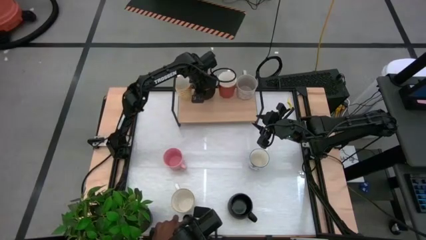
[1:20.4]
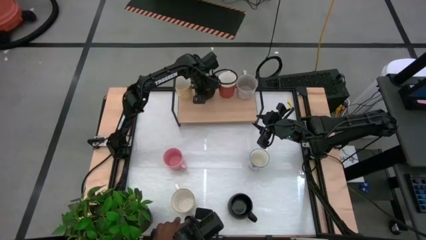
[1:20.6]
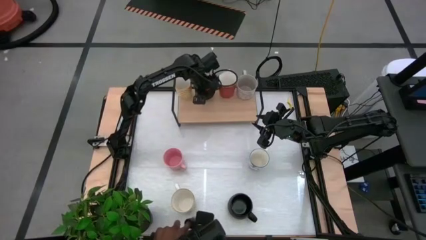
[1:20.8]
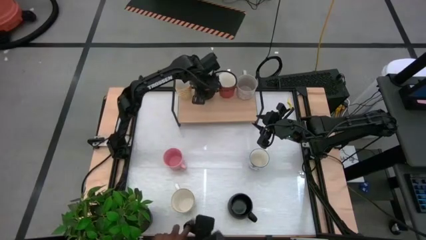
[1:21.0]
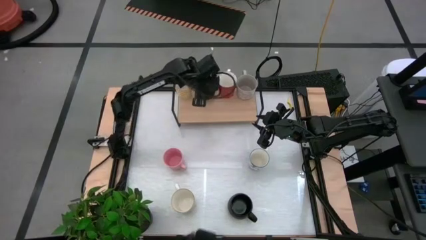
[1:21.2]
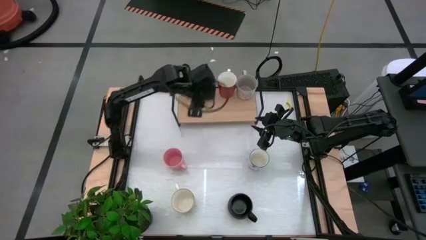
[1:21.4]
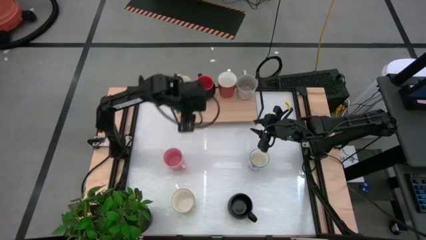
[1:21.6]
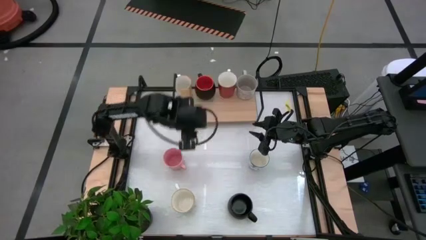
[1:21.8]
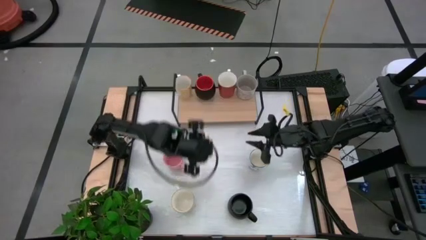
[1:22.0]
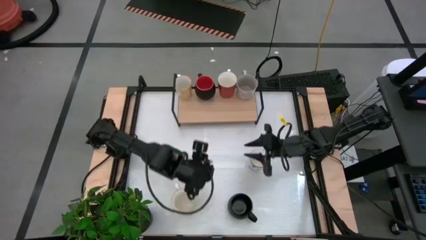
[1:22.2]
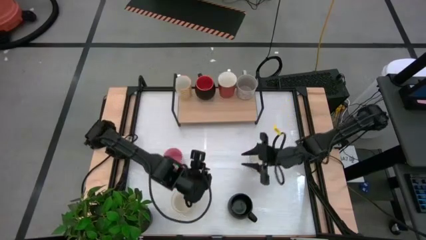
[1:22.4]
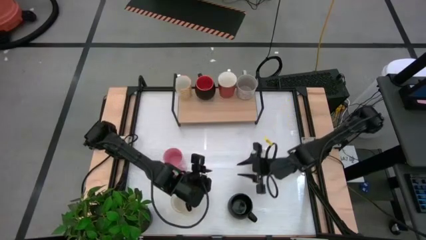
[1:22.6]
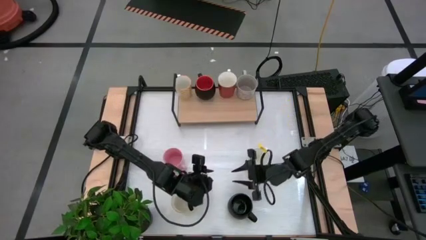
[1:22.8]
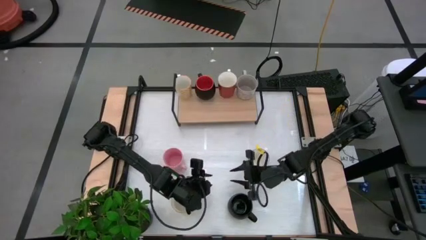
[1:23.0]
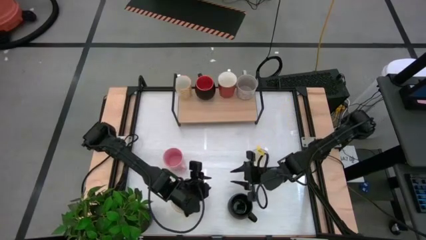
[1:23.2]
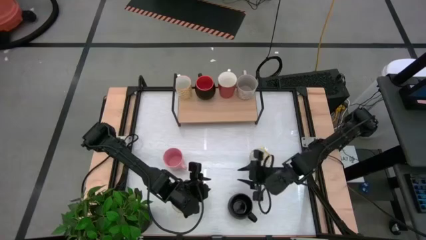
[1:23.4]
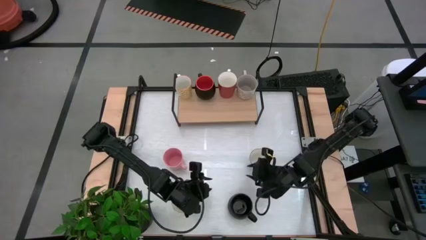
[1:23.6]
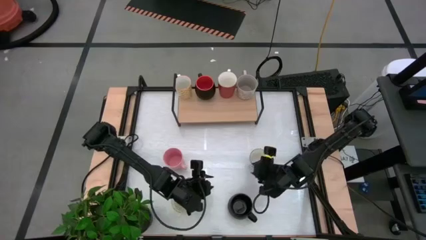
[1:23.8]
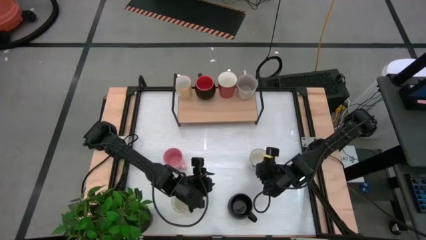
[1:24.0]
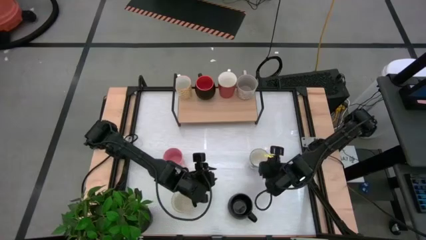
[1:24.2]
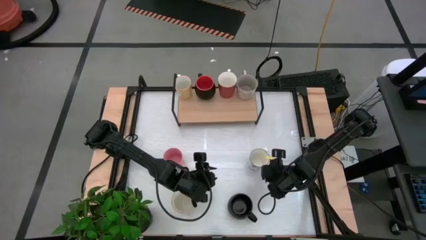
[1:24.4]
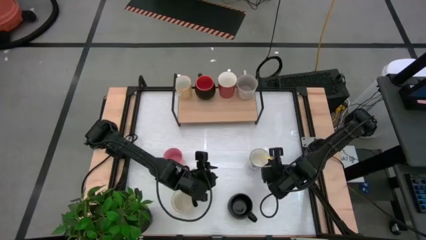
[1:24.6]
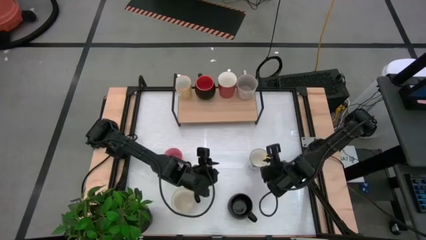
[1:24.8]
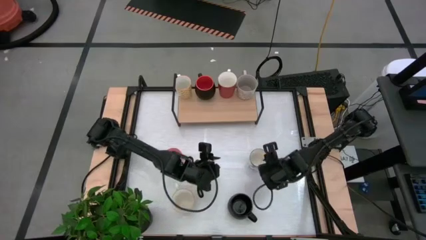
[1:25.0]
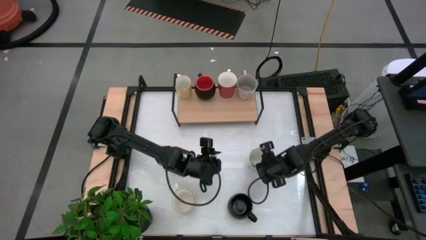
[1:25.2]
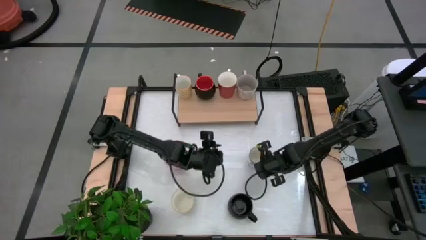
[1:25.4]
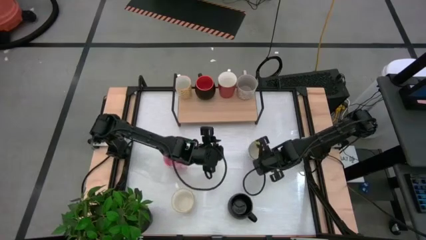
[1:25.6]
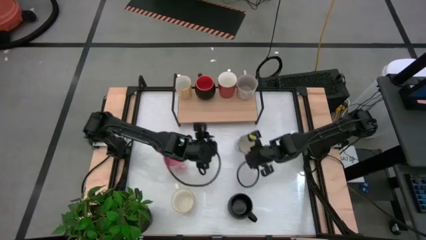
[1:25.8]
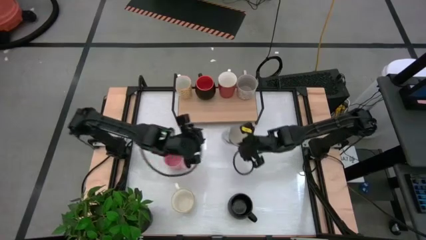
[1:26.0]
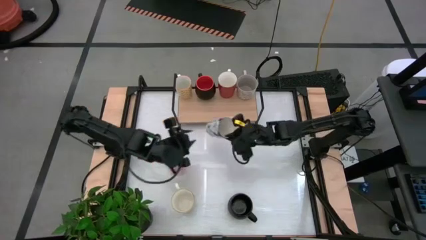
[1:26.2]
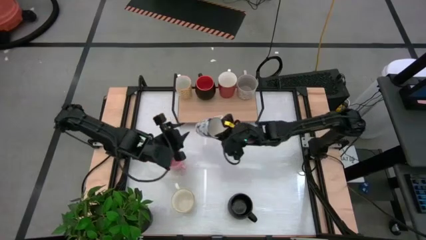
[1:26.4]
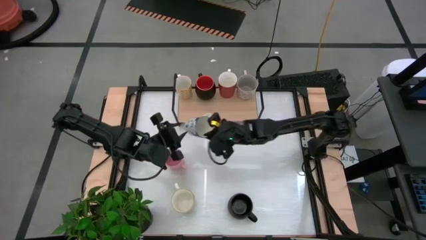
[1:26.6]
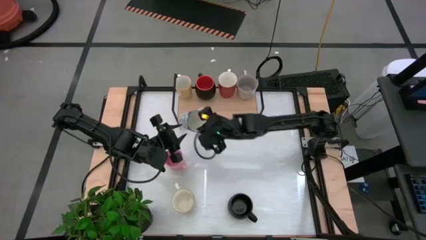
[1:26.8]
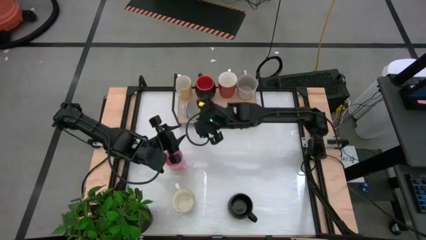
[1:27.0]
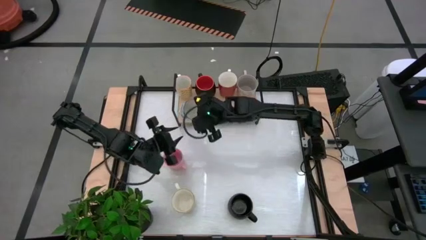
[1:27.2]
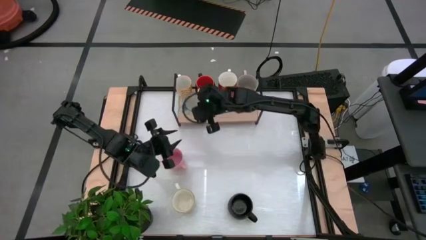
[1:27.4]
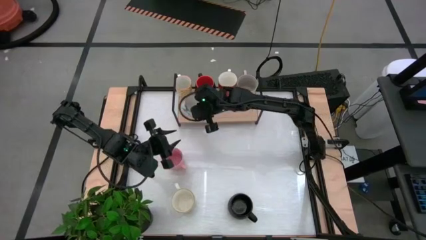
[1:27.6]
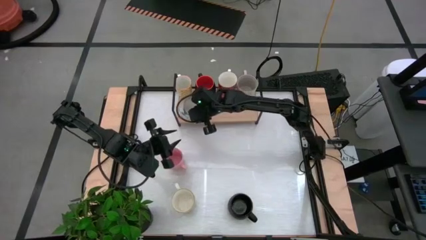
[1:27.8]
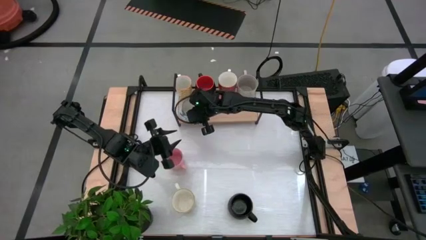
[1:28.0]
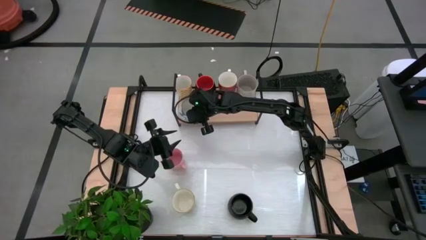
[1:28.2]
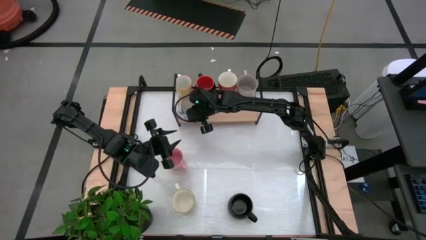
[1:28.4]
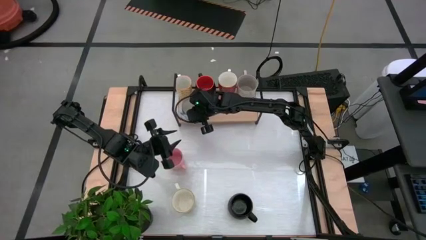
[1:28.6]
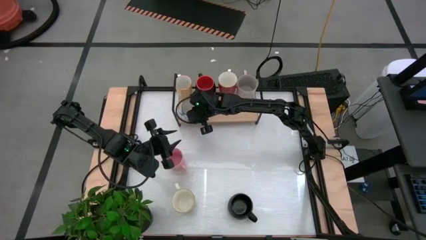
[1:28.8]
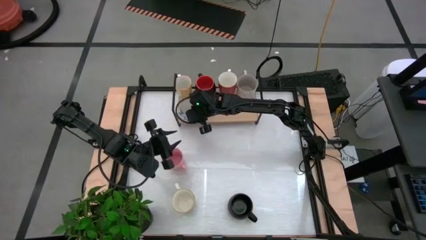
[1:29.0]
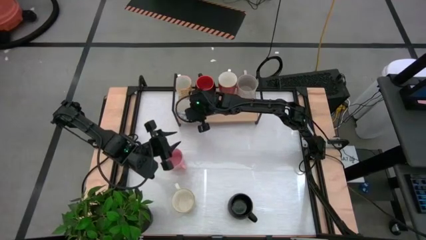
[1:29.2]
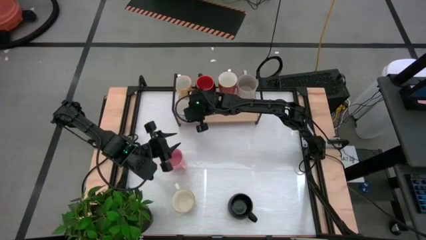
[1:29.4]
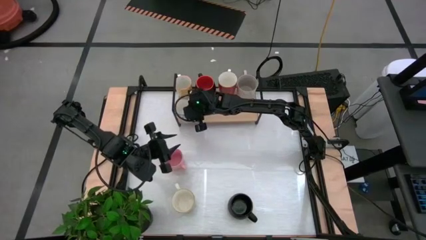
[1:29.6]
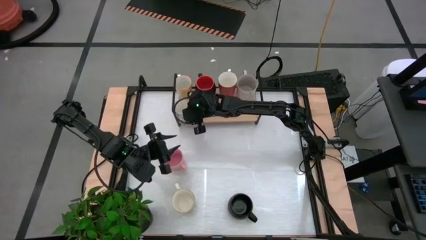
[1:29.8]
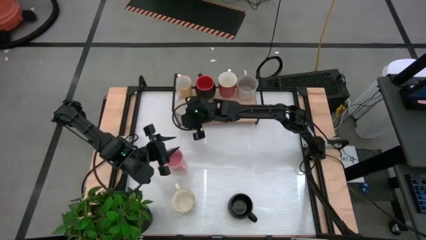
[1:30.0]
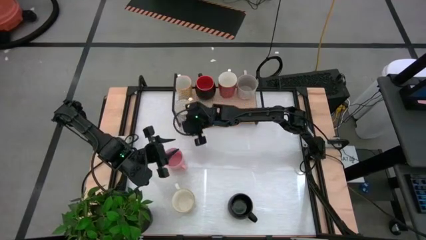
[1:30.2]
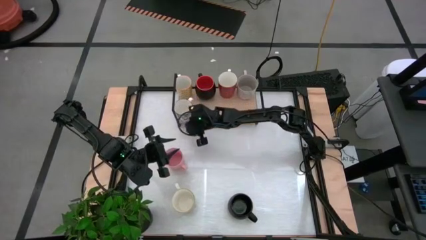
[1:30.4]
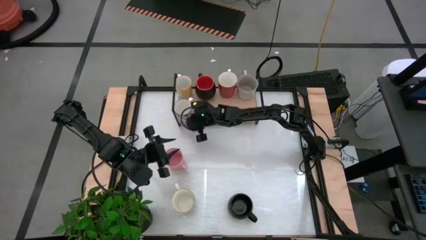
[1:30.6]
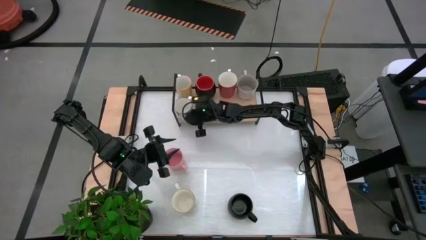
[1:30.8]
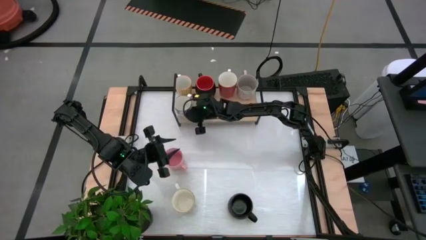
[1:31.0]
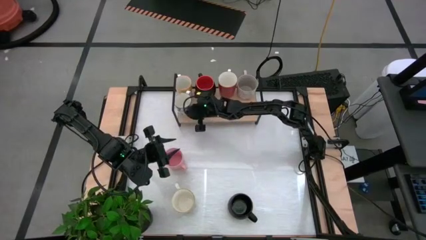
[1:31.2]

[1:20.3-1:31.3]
Task: Place coffee mugs
Put the blue mug on the shelf

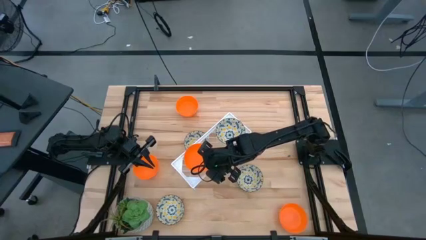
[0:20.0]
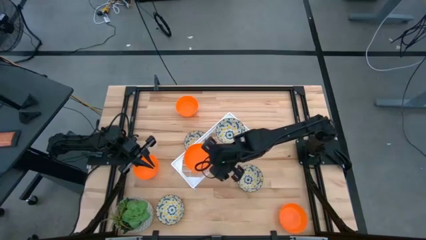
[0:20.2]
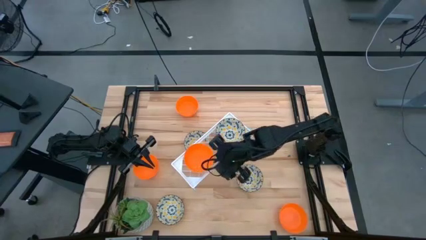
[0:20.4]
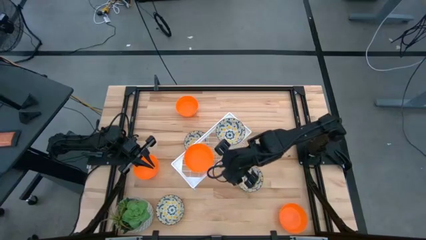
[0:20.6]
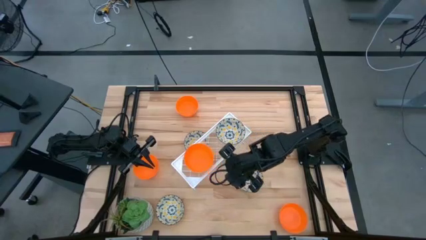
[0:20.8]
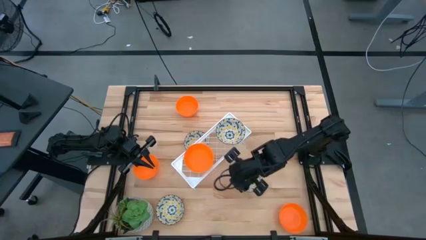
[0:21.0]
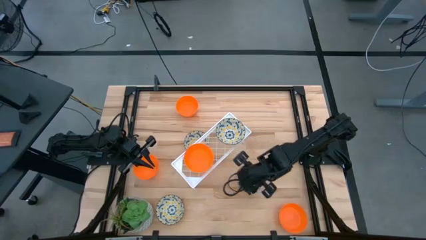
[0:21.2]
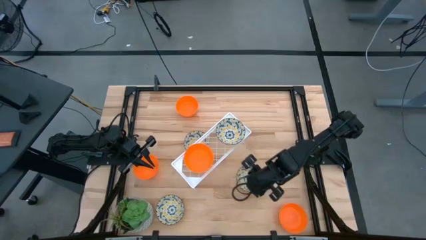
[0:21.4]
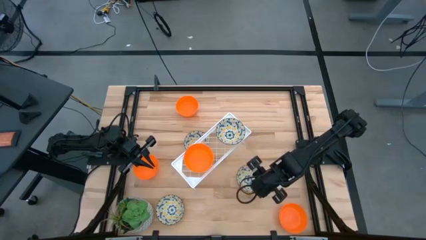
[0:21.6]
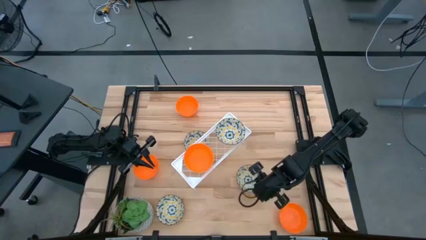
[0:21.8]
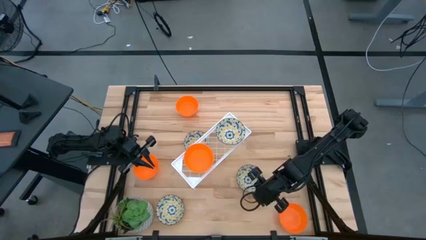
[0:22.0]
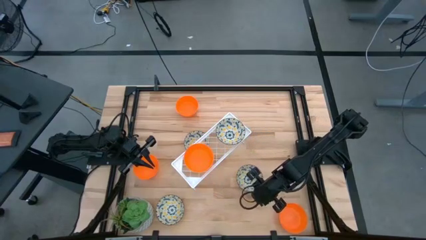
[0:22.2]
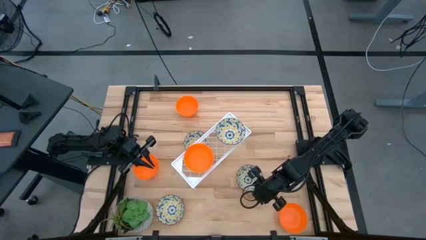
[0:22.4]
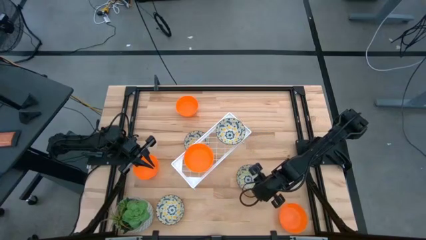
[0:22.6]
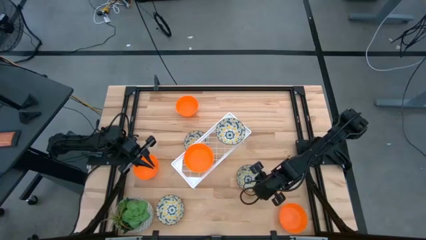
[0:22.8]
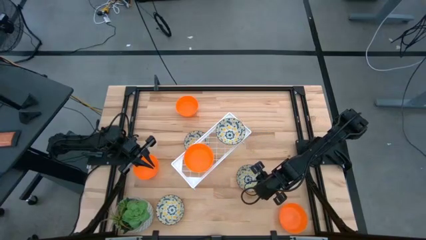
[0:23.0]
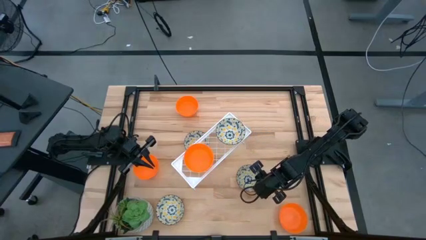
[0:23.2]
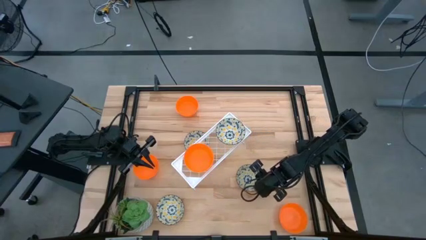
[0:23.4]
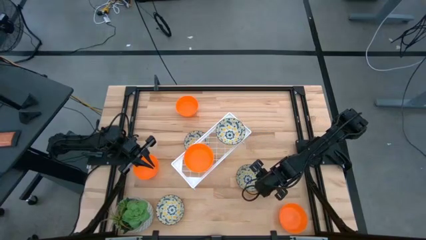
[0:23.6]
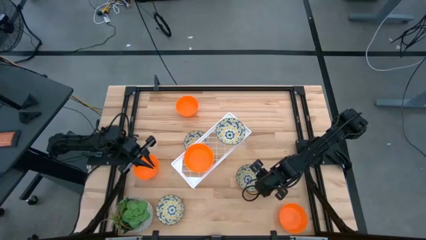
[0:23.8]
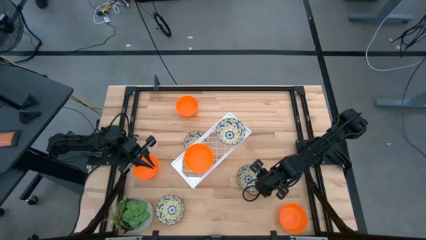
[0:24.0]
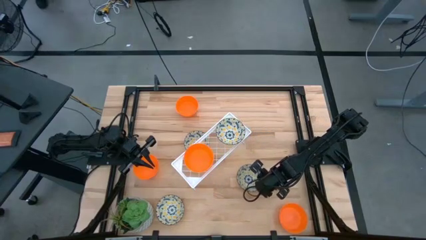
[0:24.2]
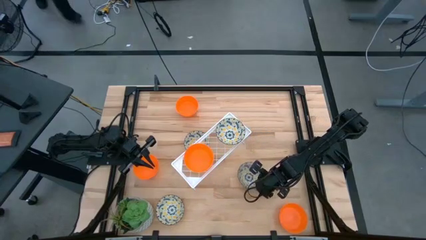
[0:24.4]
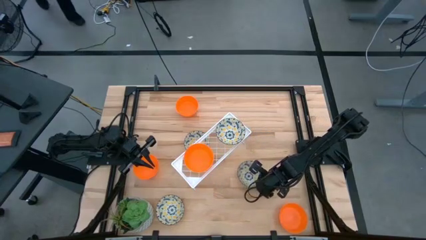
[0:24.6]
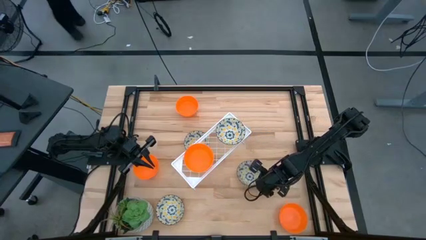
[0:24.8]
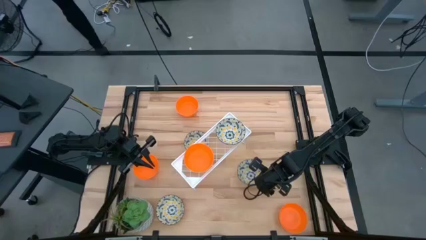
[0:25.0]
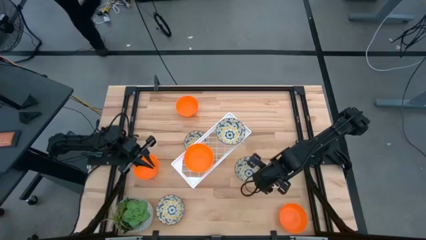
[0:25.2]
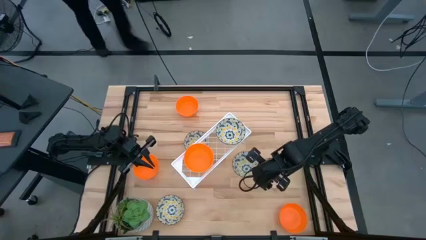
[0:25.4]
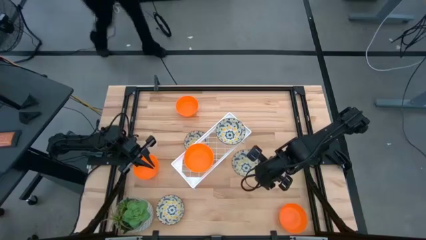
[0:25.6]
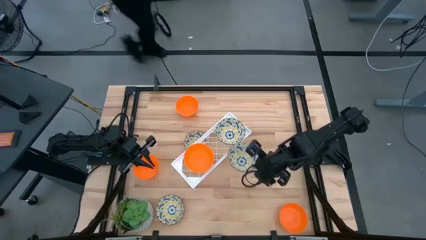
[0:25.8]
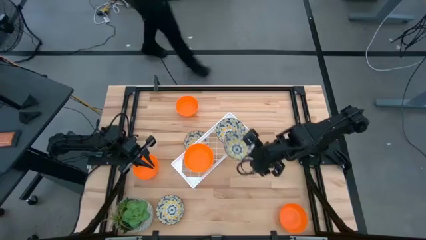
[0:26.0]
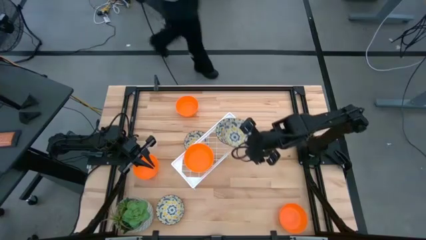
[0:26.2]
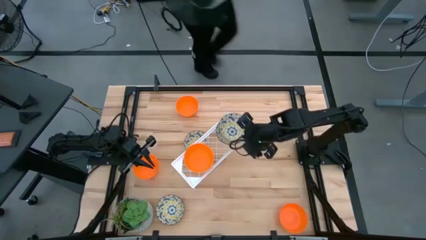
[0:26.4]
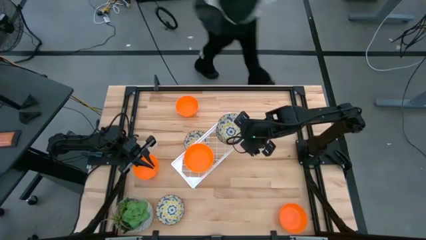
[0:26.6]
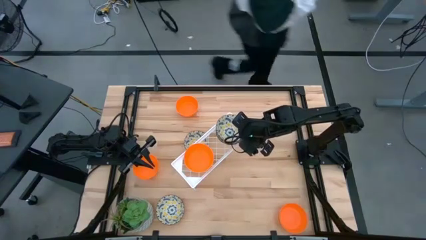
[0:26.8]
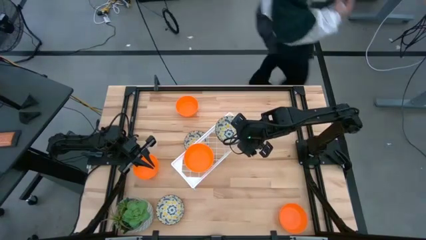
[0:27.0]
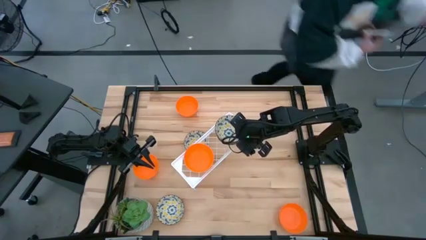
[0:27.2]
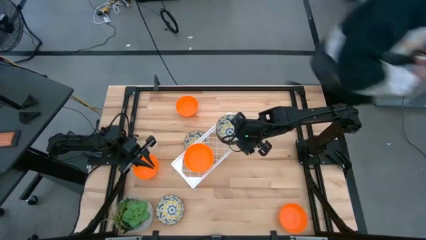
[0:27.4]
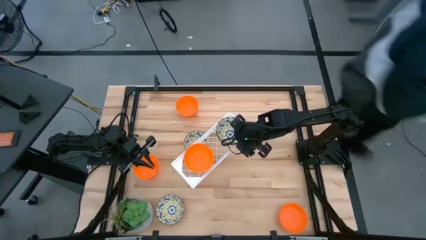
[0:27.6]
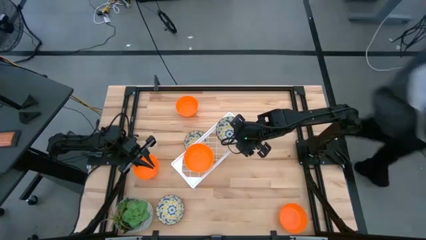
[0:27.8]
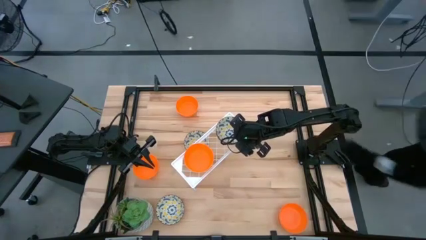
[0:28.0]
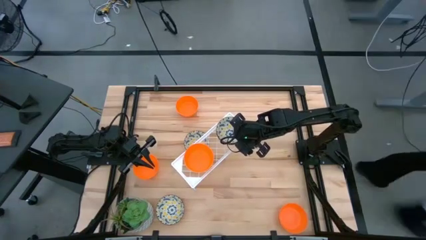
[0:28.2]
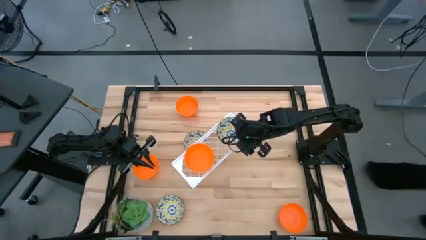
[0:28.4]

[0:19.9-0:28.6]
Task: Pick & Place Mini bowls
Stack the yellow patterned bowl on top of the yellow patterned bowl on the shelf
